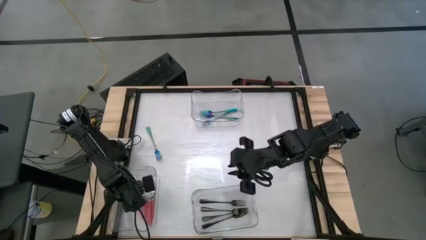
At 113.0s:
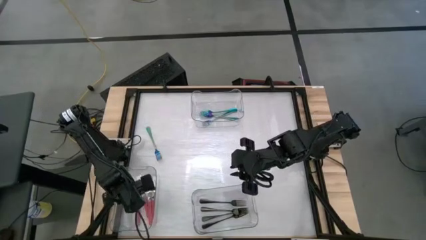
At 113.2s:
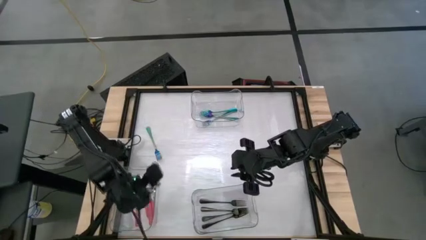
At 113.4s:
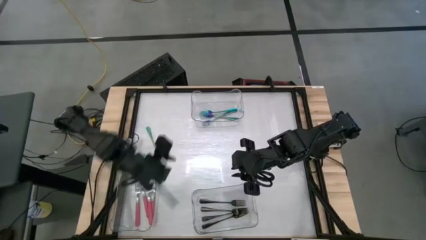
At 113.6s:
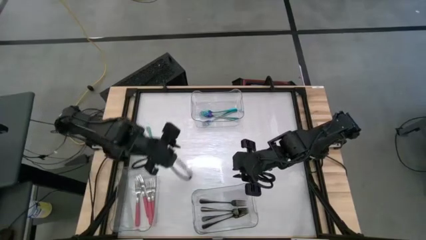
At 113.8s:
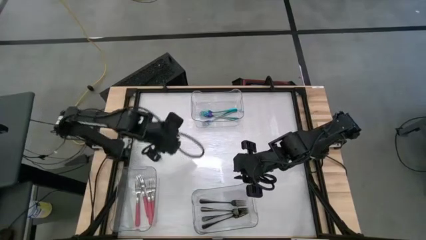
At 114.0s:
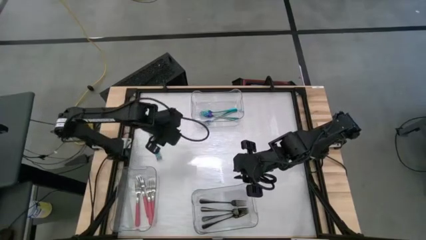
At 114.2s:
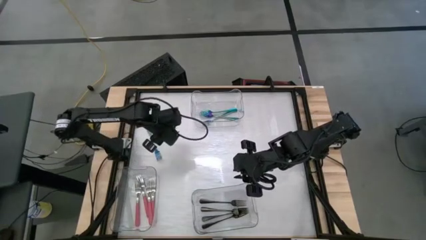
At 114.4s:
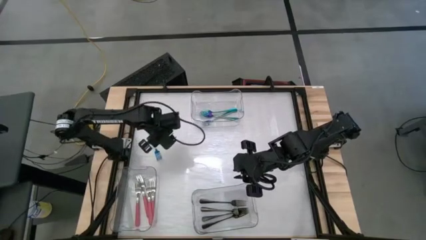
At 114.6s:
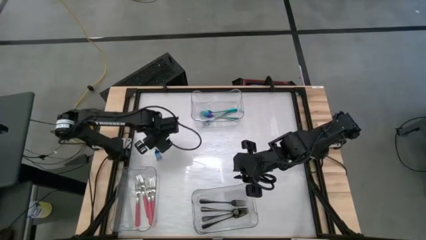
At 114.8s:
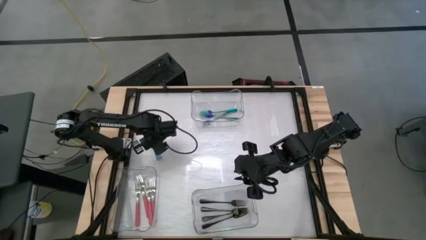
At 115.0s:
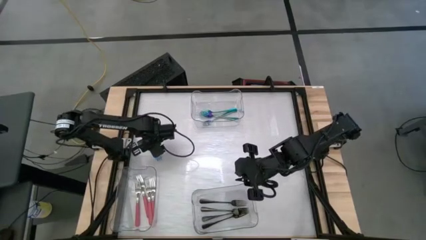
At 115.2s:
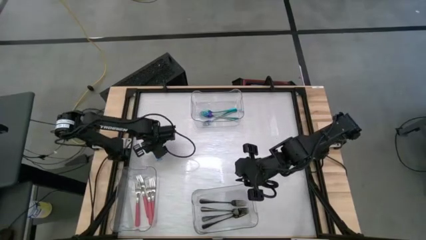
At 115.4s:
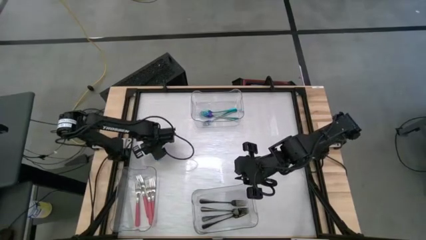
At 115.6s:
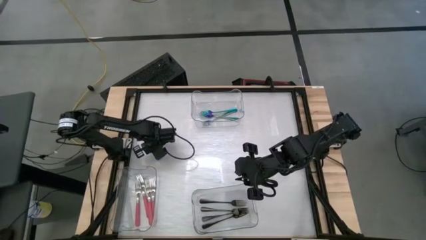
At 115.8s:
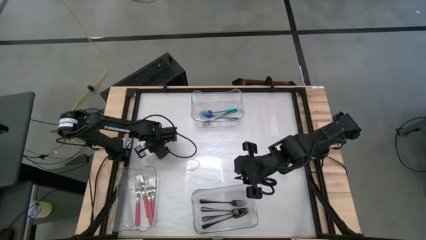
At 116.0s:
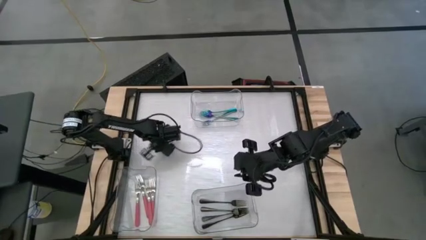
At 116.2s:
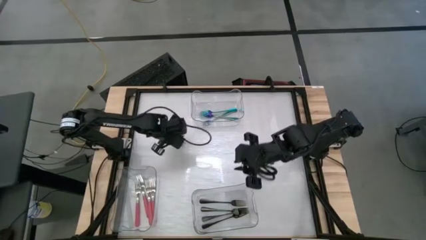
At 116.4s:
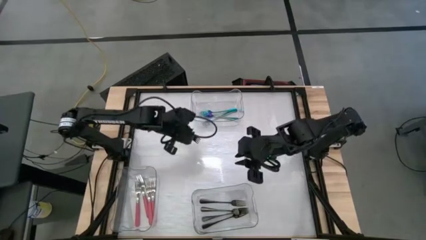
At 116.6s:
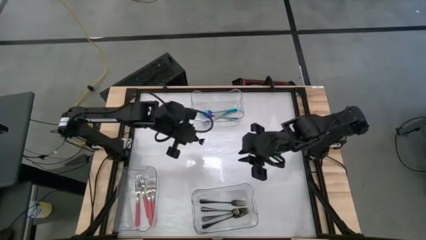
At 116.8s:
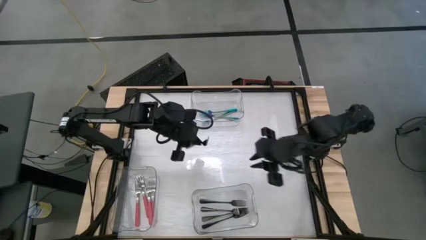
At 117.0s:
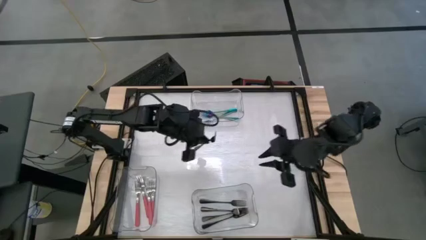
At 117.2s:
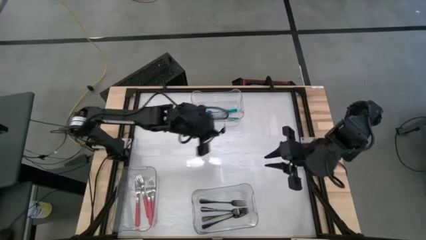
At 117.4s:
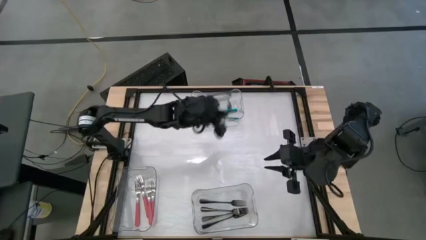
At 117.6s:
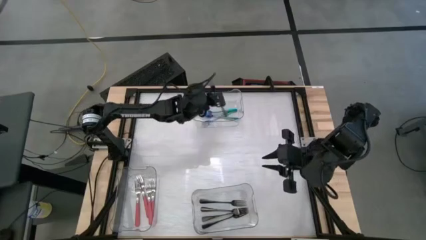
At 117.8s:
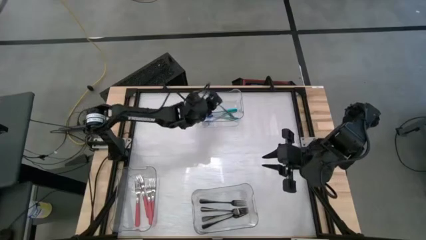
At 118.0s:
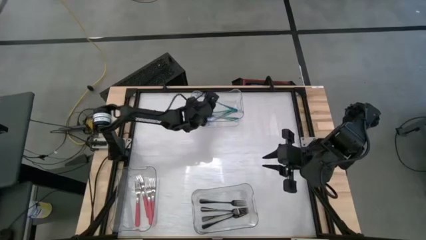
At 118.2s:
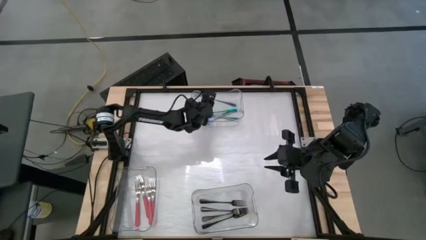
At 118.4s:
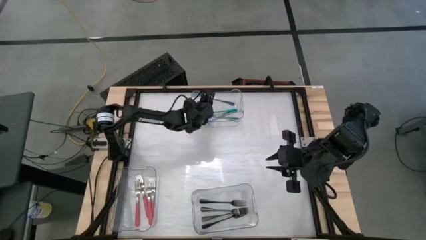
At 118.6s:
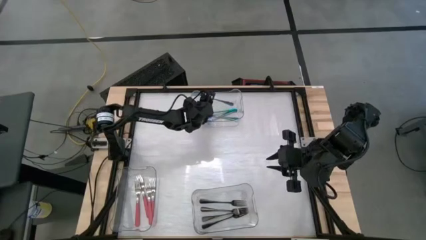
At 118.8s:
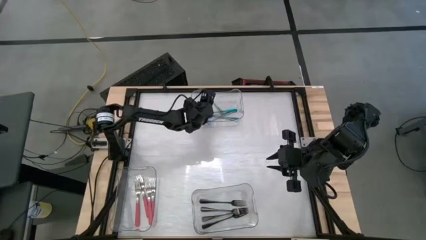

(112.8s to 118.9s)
Task: Sort silverware by color (type)
Put the blue fork into the top transparent bin

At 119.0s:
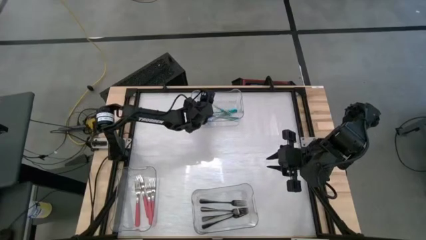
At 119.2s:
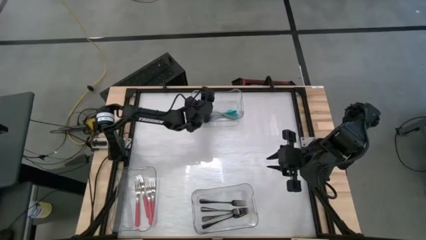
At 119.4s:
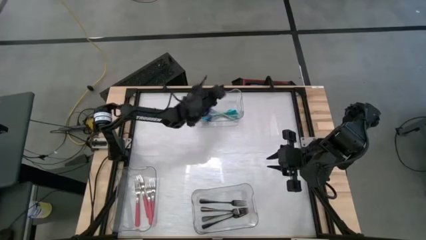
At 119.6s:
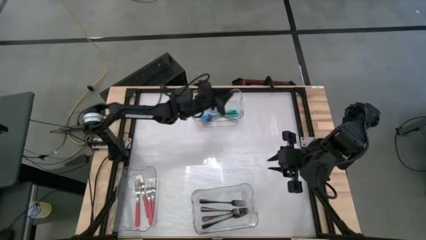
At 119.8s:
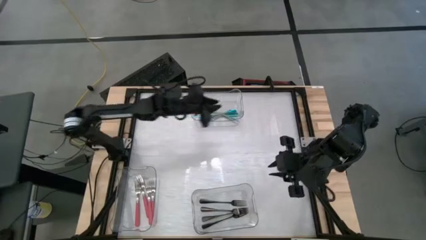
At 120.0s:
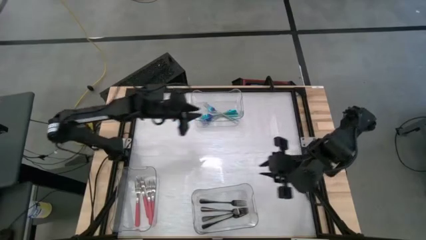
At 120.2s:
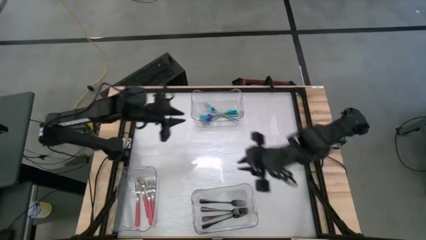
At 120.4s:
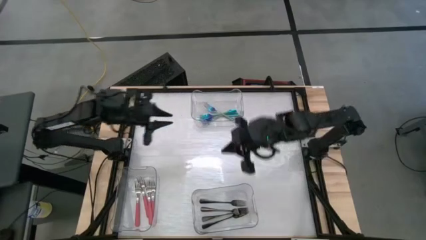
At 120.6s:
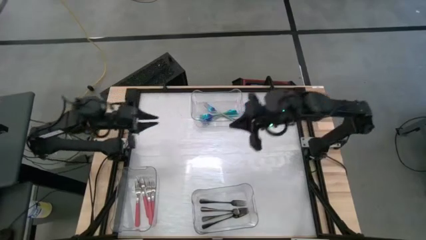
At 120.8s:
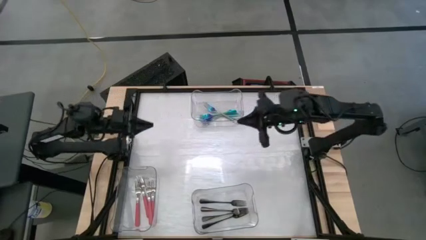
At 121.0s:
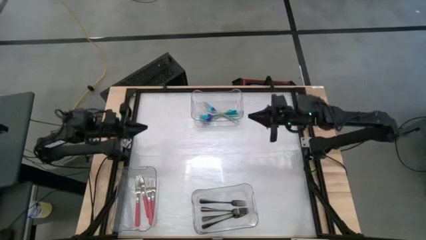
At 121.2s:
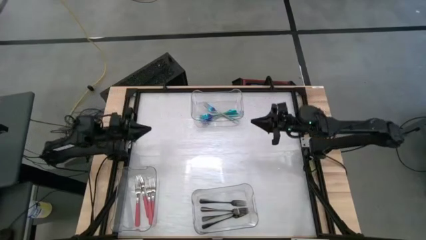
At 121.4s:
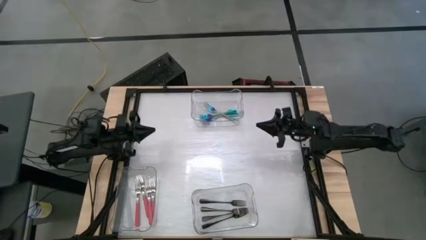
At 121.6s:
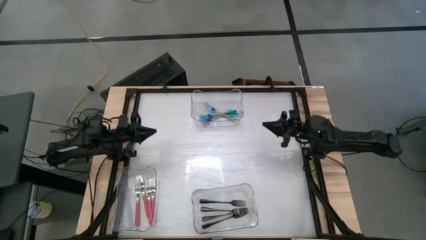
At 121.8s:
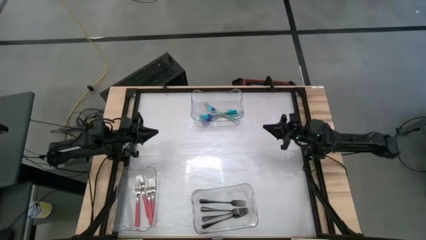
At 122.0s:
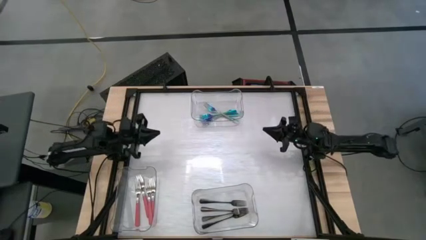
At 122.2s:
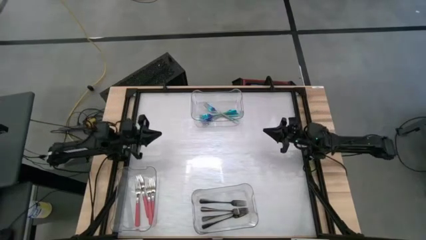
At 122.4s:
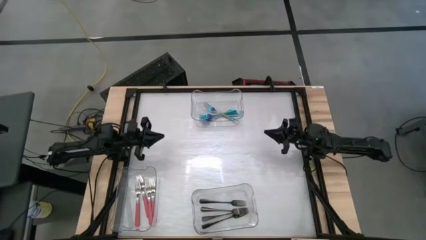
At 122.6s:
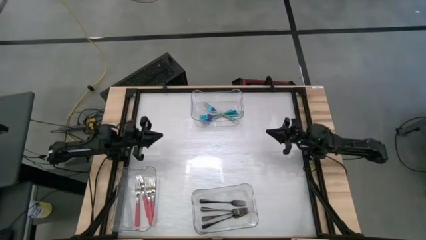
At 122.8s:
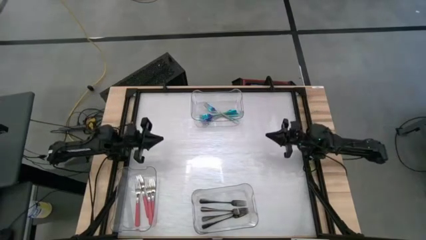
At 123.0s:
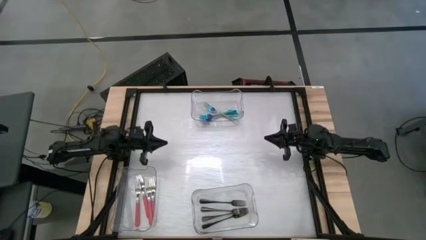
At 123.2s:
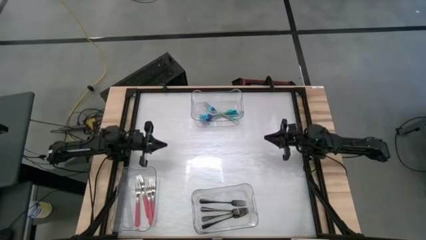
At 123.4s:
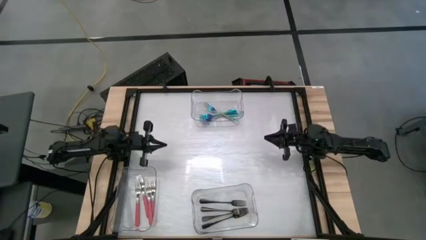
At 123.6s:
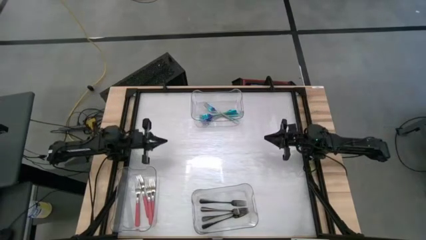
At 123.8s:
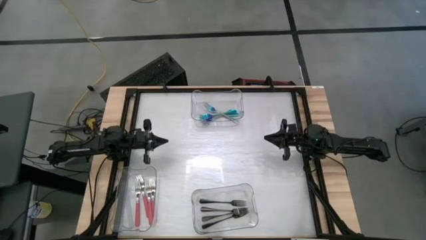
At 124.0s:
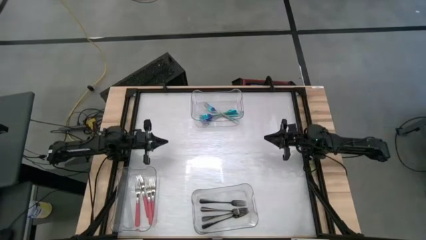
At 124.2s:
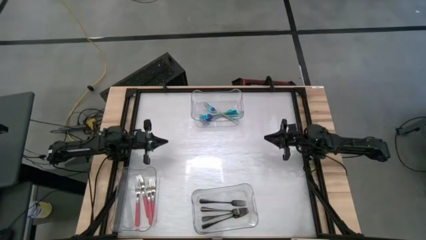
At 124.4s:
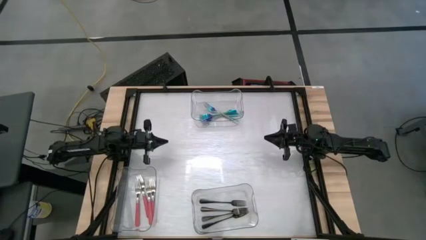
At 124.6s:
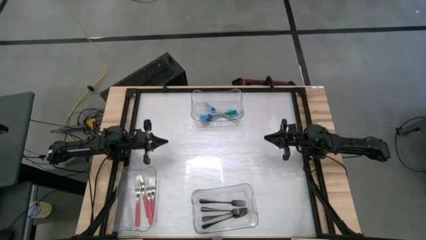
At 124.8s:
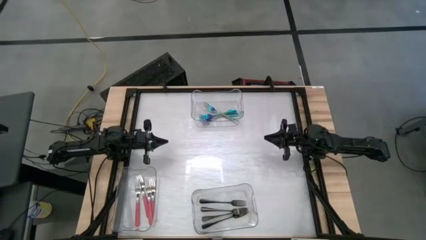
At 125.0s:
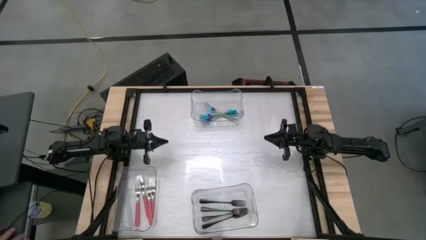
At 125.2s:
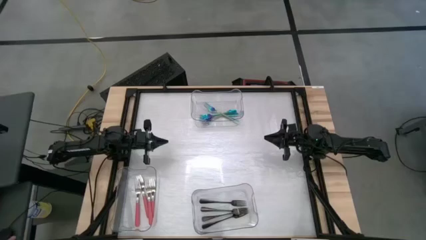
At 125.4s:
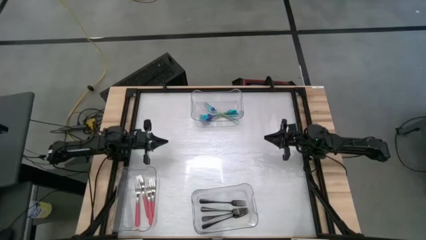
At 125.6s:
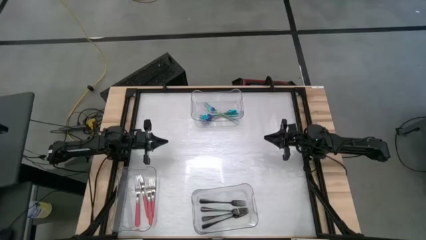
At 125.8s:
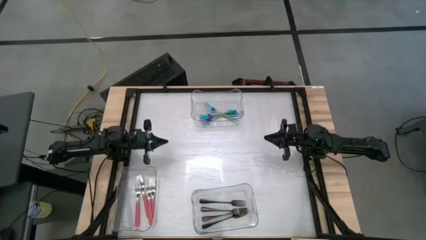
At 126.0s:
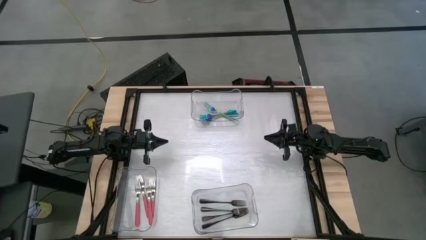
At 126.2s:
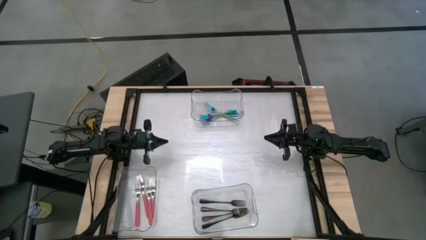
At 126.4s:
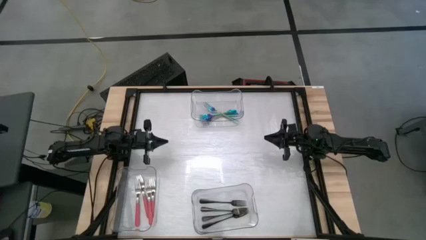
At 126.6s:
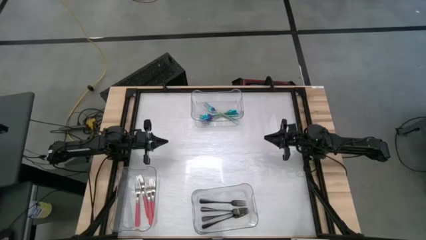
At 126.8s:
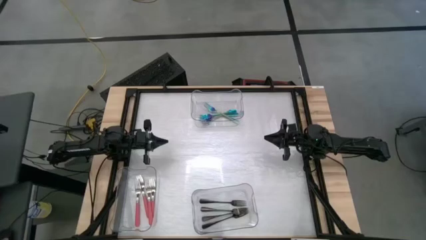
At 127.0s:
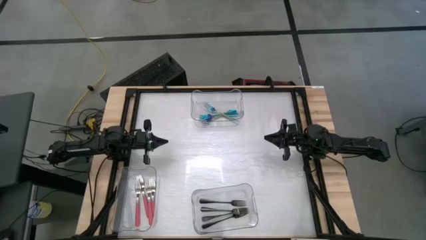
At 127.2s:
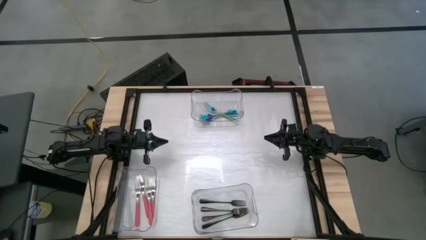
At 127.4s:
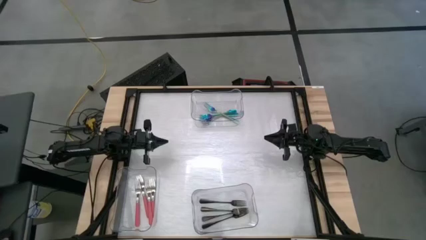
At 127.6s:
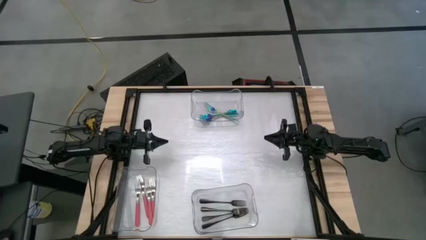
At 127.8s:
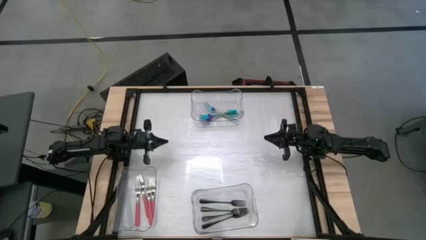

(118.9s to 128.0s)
Return to Home Position

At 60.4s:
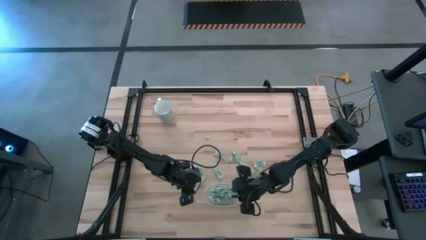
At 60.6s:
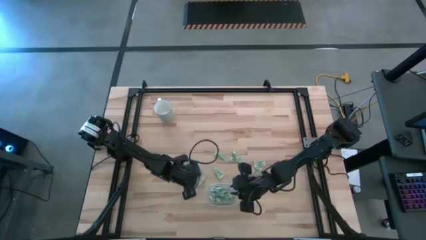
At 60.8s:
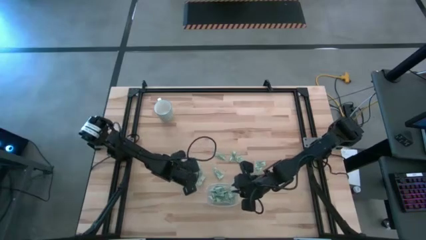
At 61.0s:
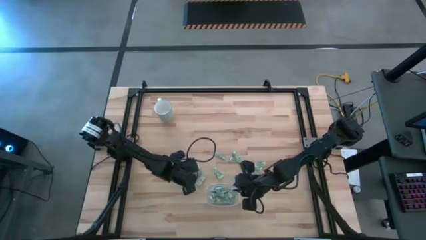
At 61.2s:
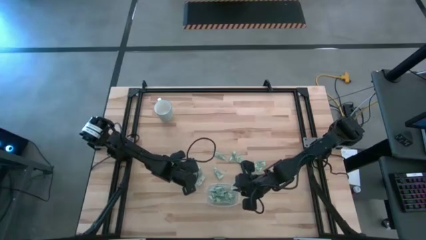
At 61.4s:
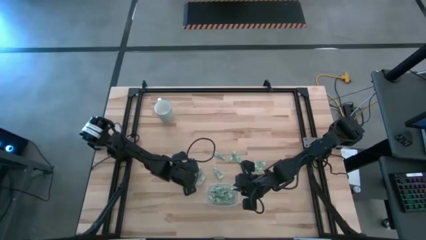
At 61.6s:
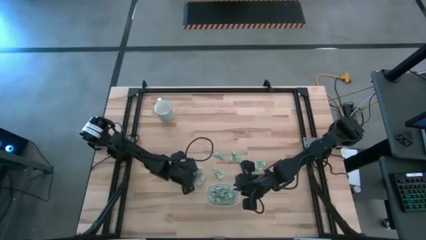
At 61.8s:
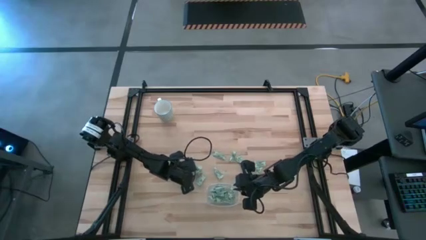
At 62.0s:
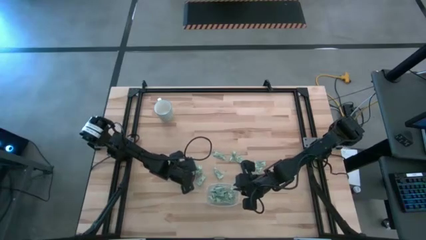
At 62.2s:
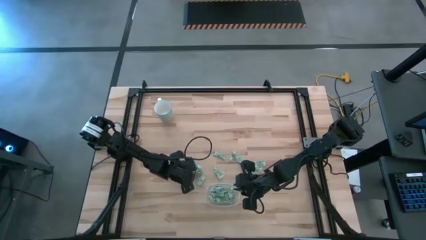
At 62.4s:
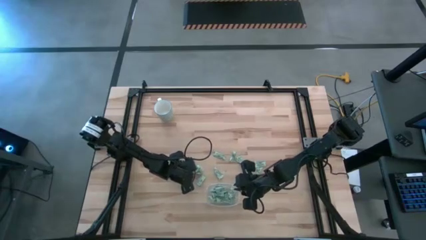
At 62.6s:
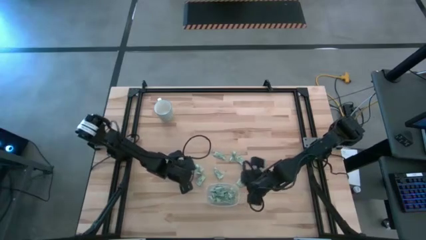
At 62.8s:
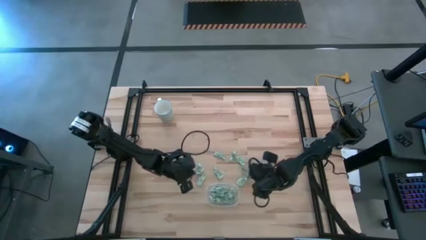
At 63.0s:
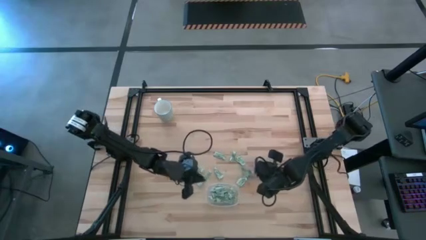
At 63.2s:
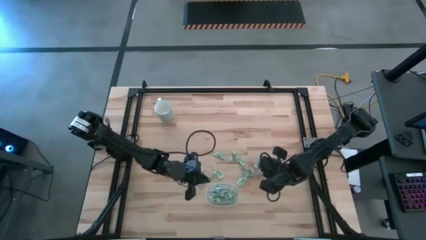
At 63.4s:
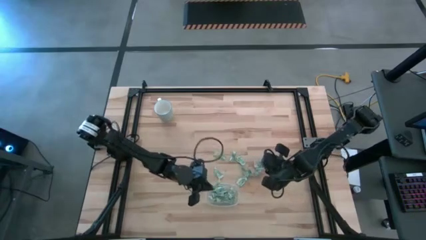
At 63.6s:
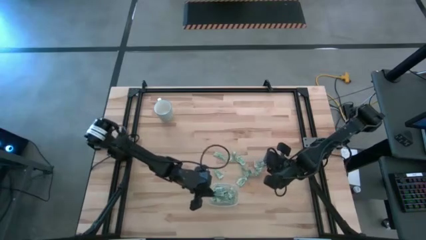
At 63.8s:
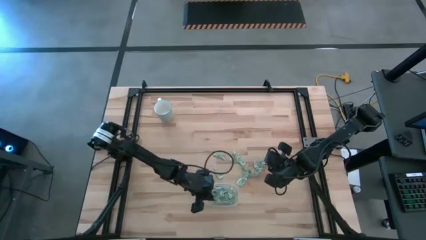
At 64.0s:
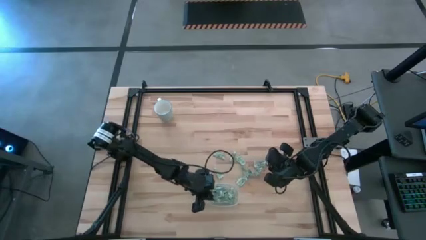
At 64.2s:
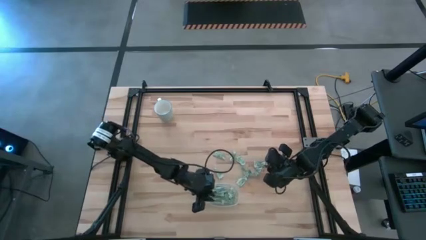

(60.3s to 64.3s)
Task: Pick and place Stevia / Truvia into bins
Put the stevia packet into the transparent container
